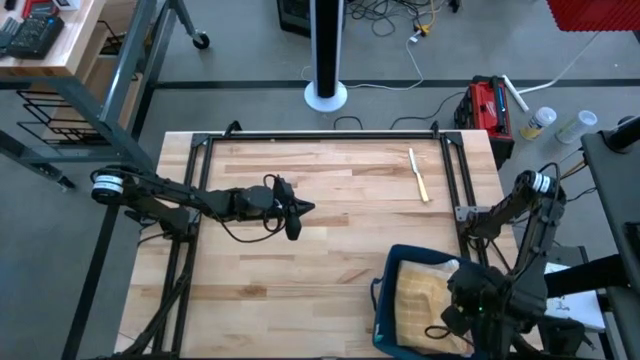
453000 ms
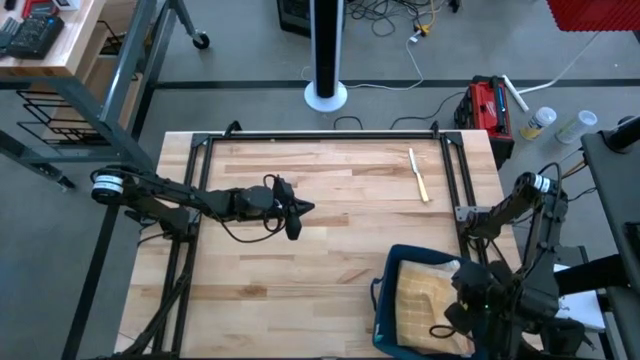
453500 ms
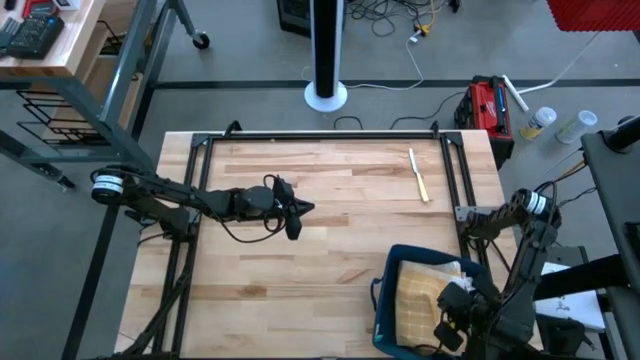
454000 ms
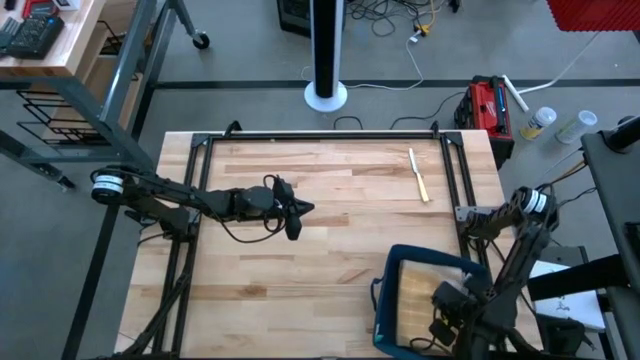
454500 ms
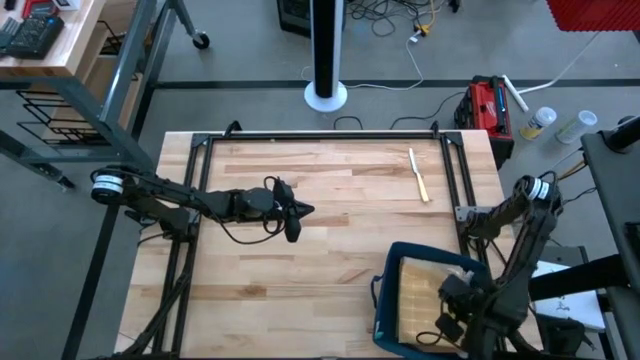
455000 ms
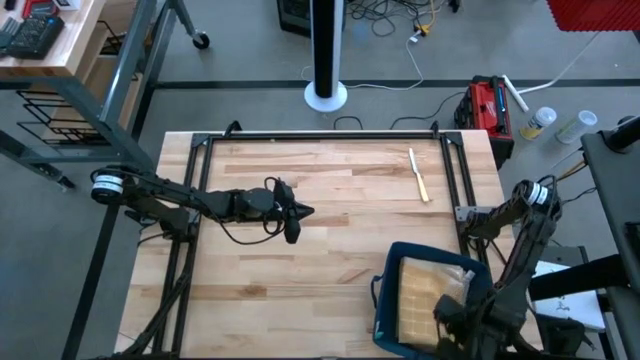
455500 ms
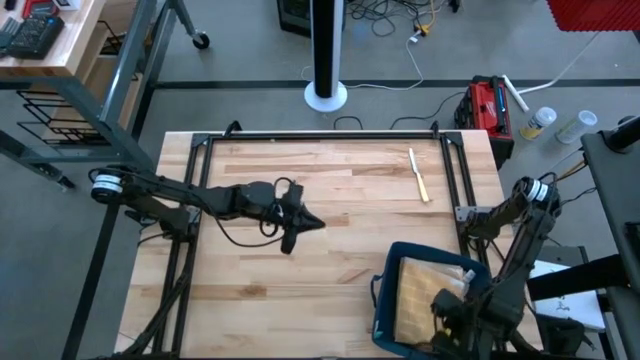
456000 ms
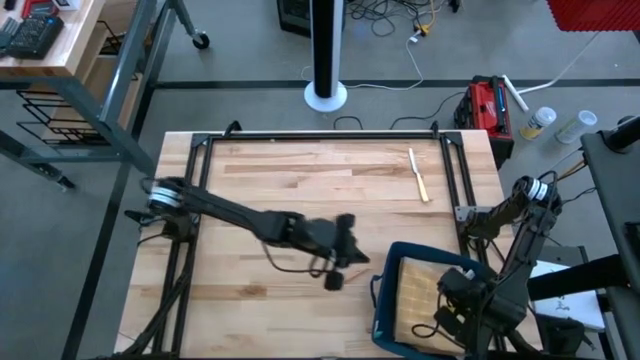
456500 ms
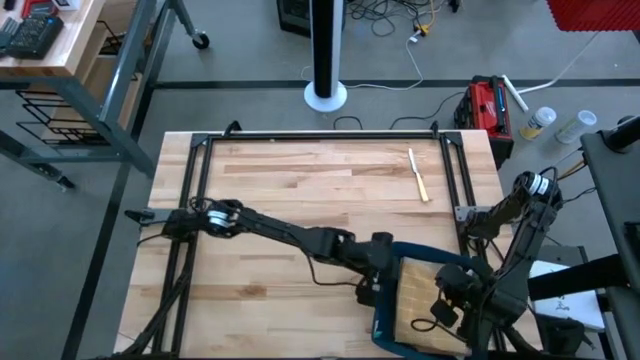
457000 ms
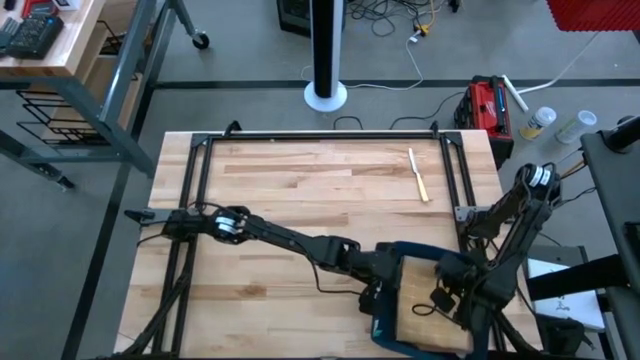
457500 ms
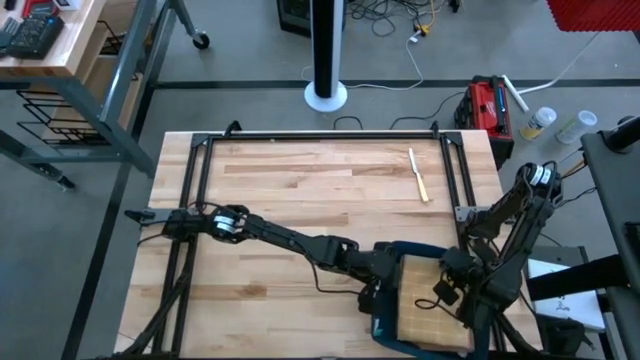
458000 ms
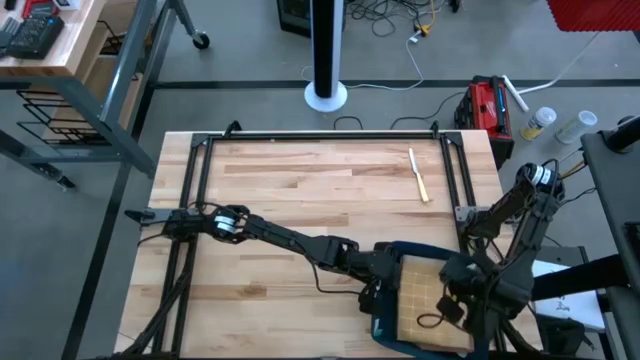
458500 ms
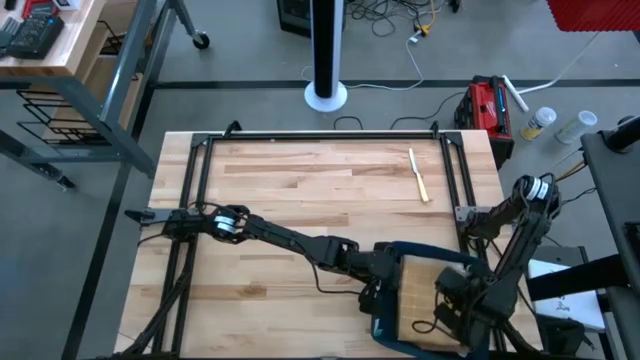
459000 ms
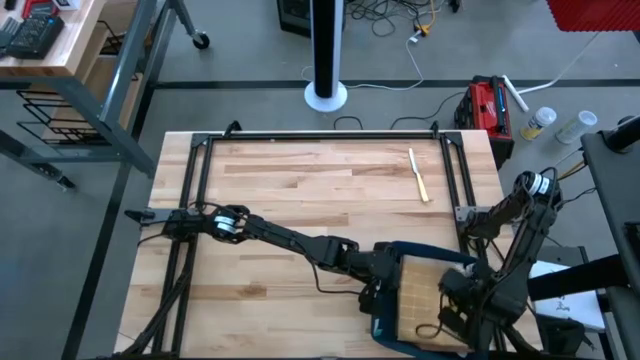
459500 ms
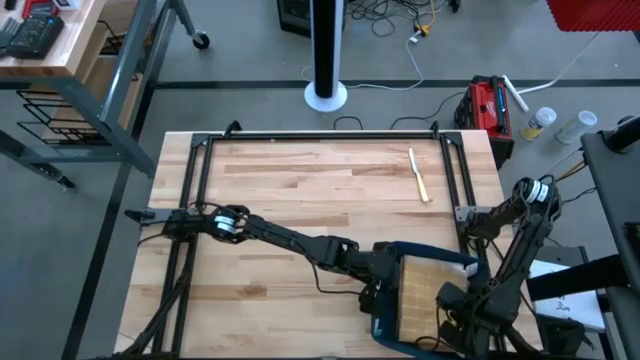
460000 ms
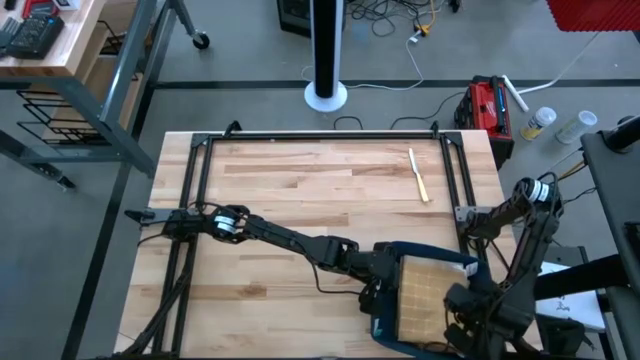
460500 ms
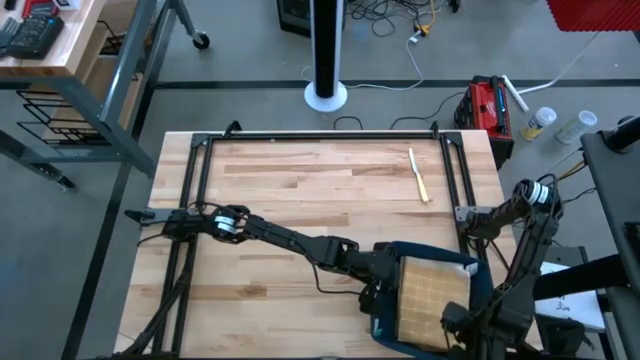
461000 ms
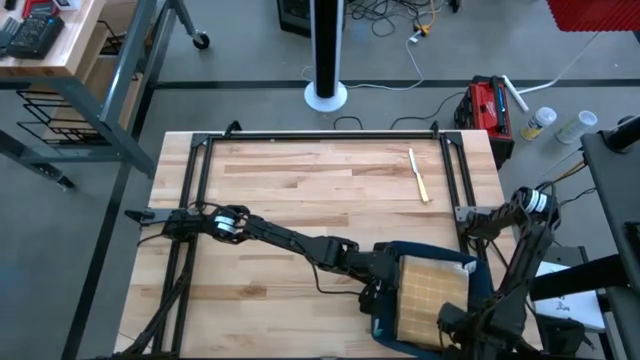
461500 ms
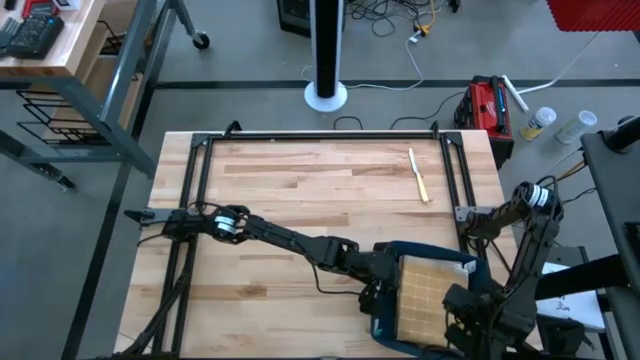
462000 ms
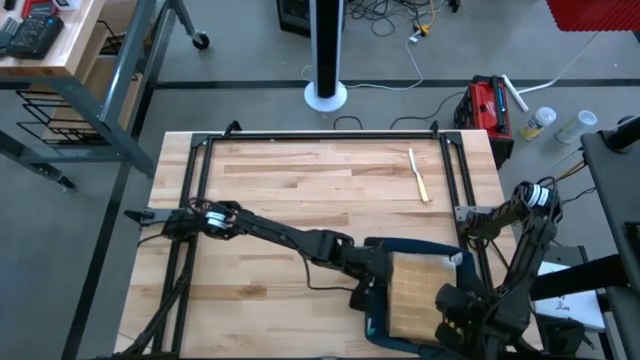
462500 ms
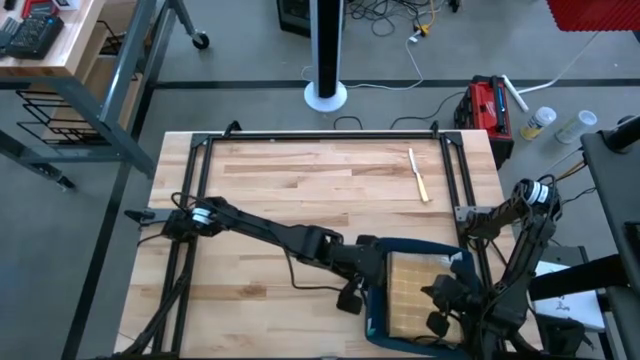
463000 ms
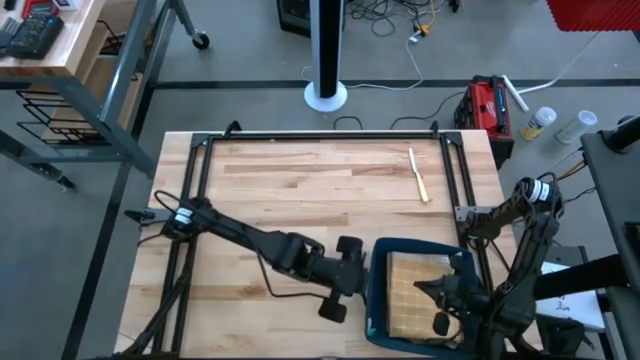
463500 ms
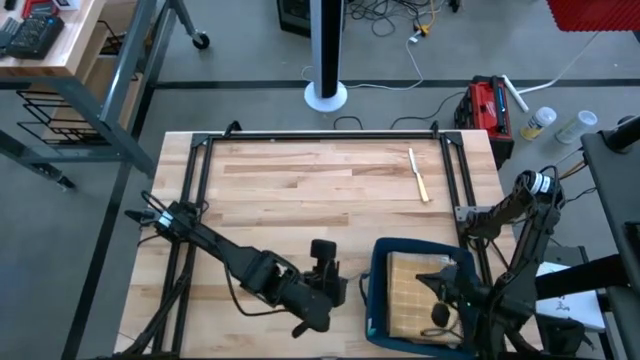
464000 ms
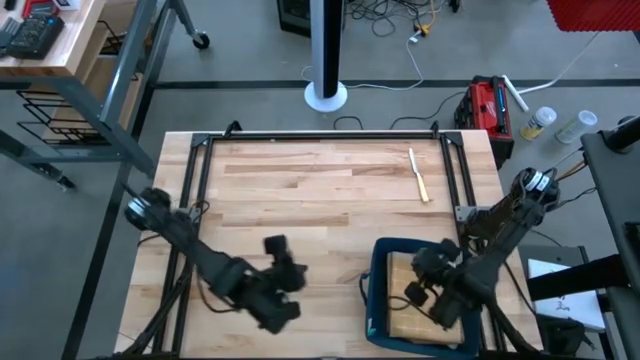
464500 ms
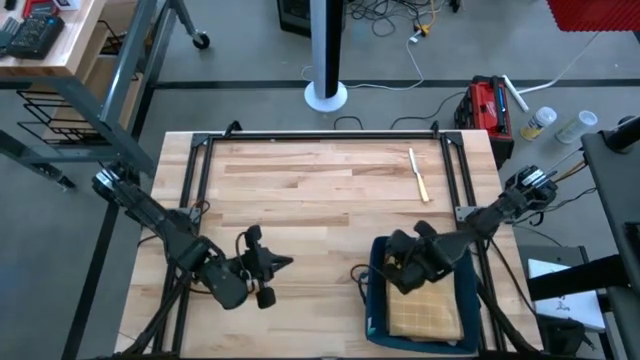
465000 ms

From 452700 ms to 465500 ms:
Task: Fold towel
Put the stacked towels into the blue bin

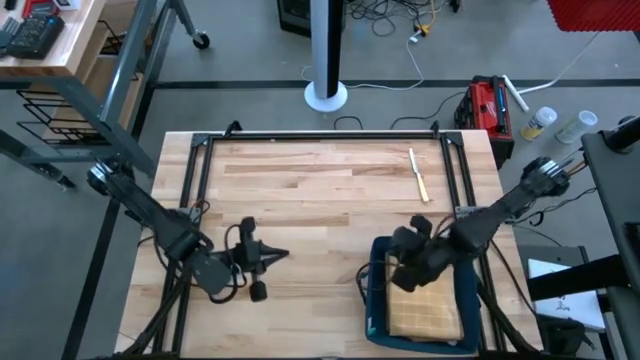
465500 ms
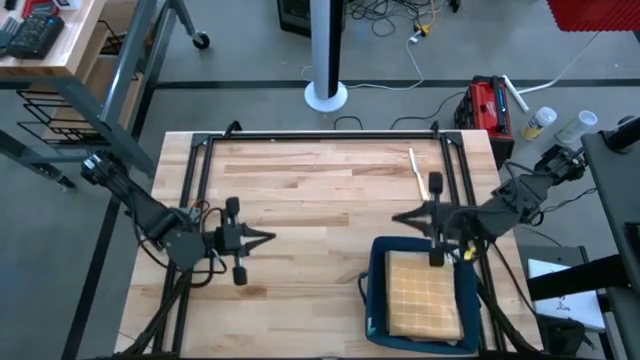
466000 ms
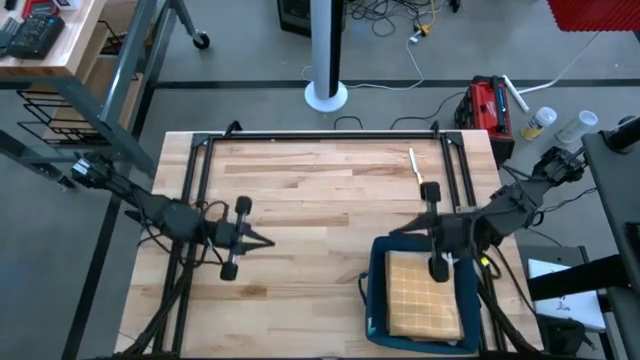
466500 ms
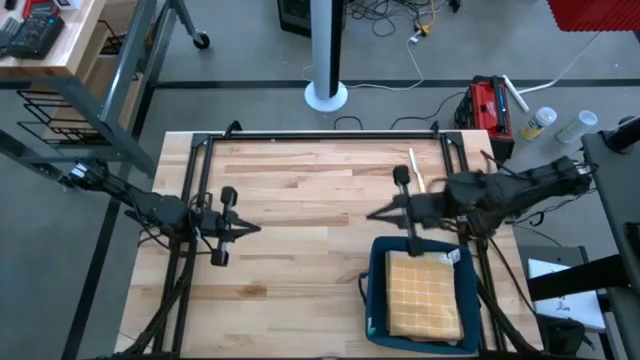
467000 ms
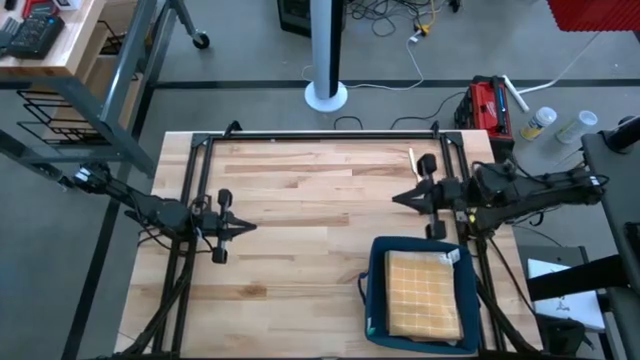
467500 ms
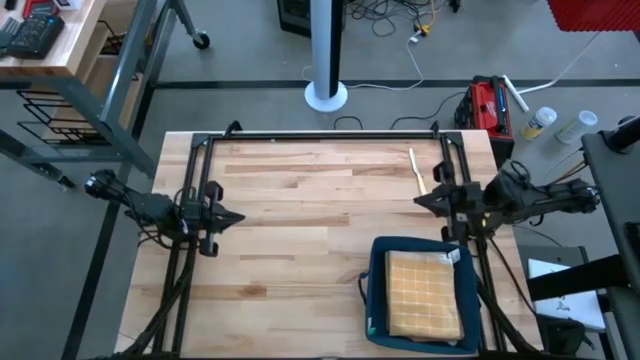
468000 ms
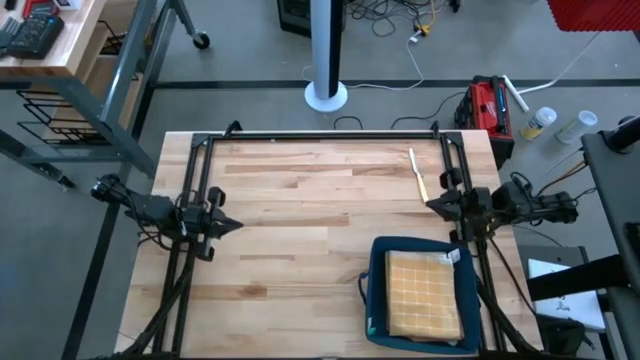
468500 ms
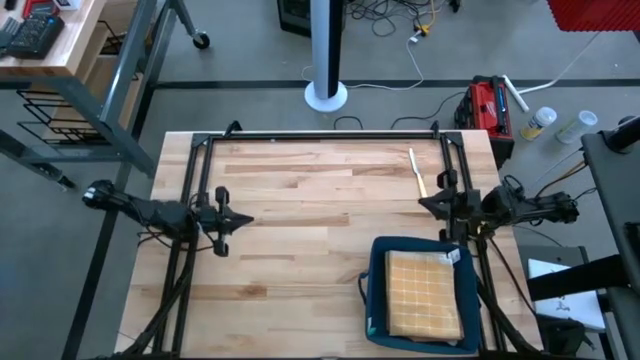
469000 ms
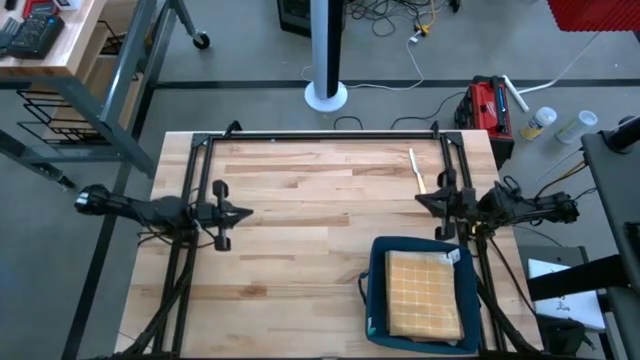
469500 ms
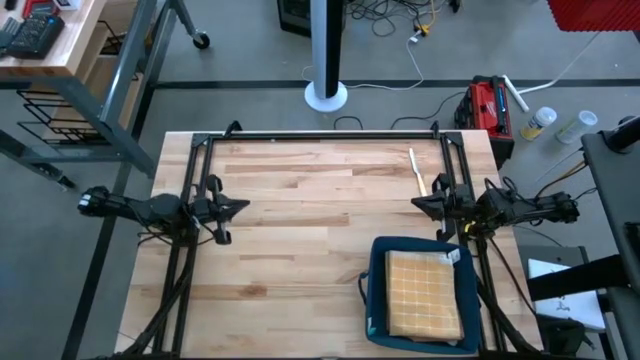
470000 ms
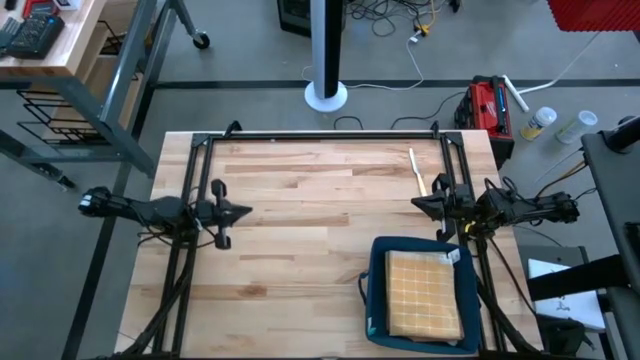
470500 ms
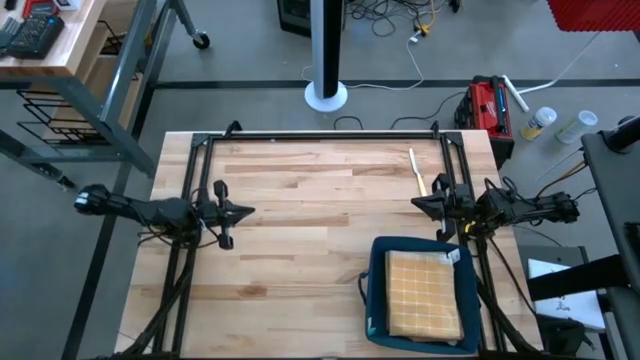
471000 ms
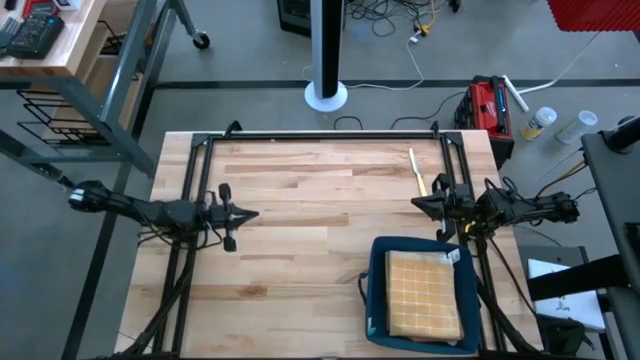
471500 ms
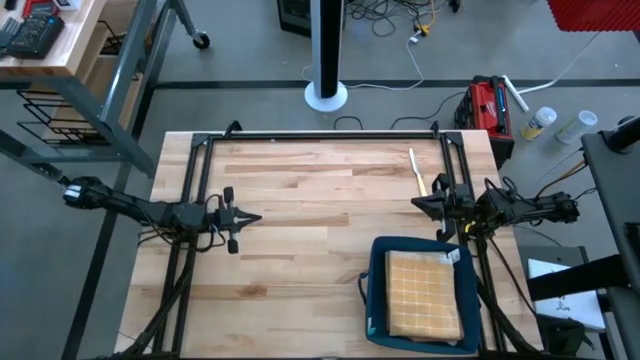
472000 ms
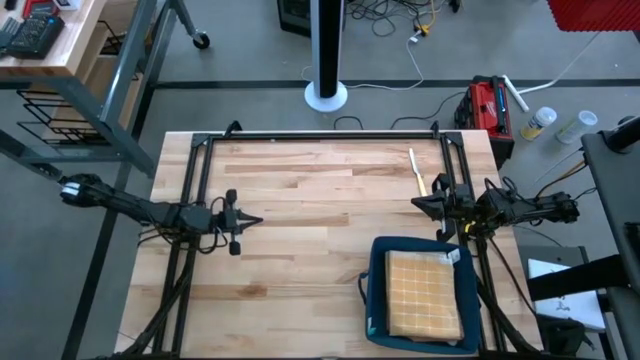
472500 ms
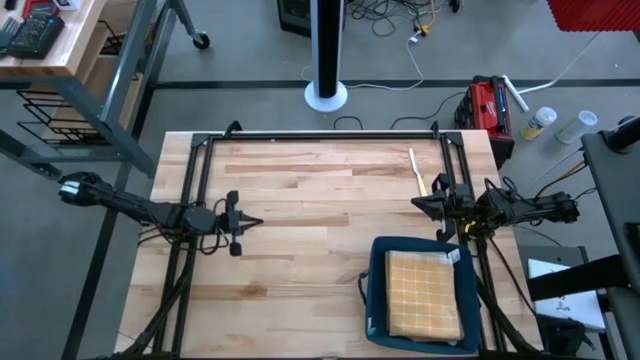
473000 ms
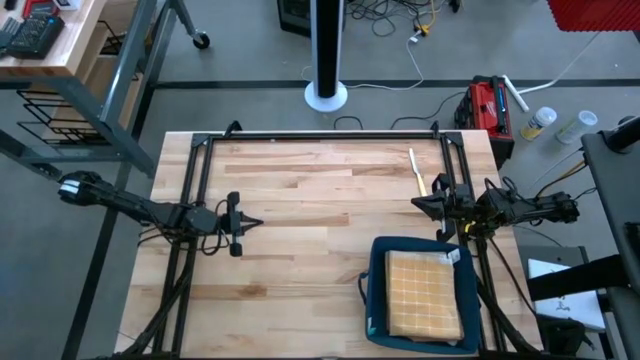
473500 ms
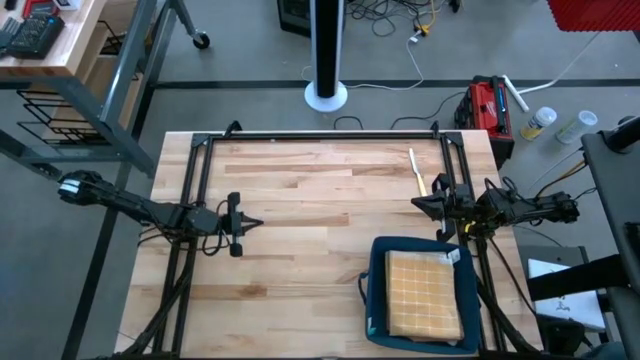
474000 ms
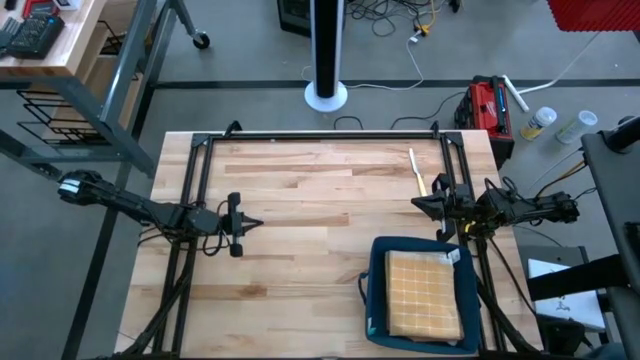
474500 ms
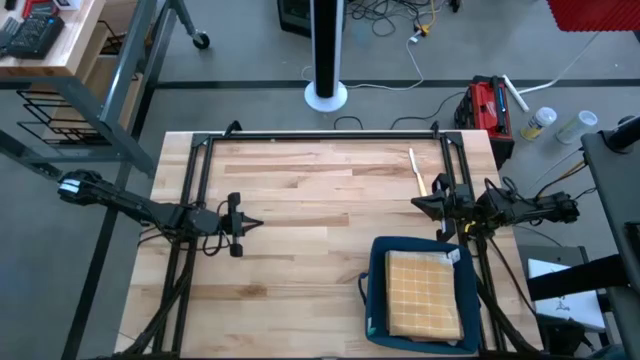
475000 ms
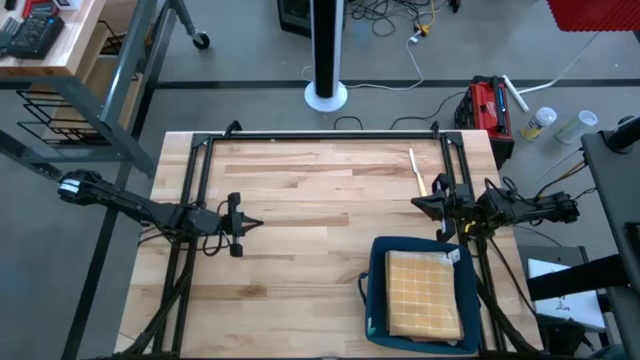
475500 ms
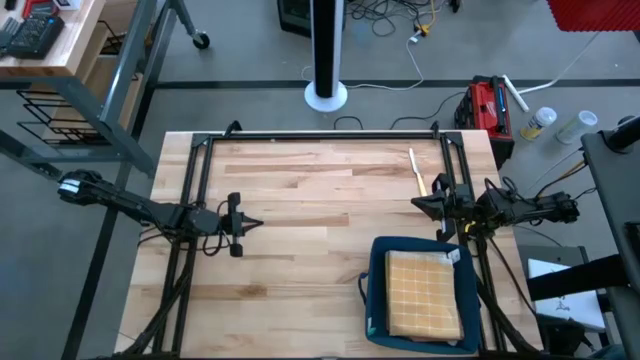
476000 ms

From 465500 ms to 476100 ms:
Return to Home Position
